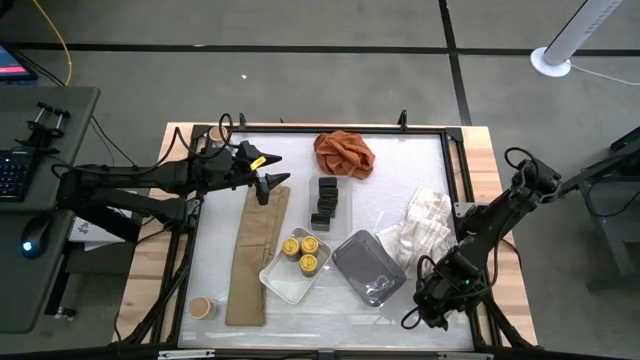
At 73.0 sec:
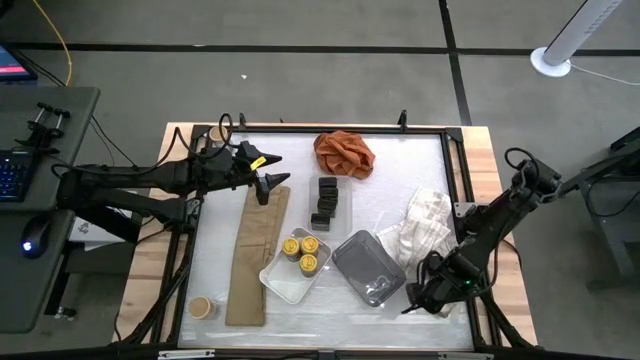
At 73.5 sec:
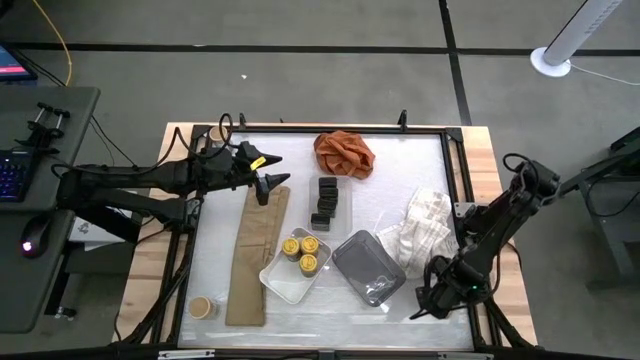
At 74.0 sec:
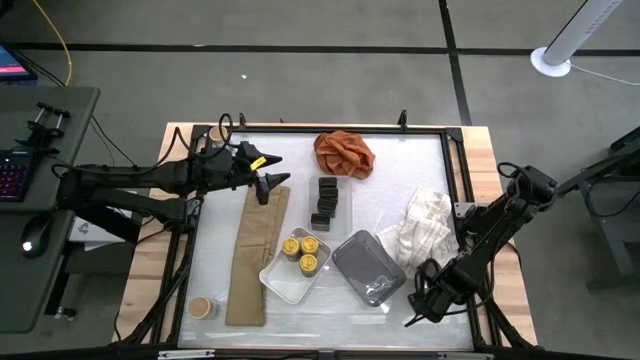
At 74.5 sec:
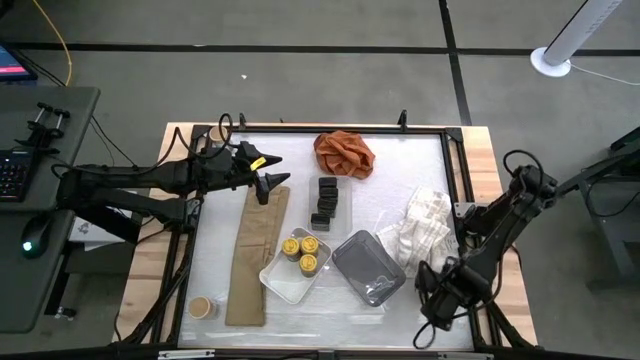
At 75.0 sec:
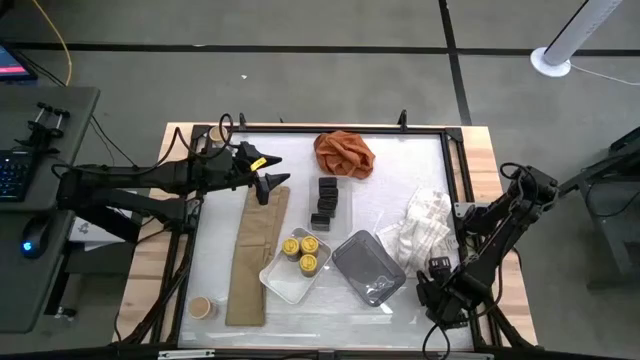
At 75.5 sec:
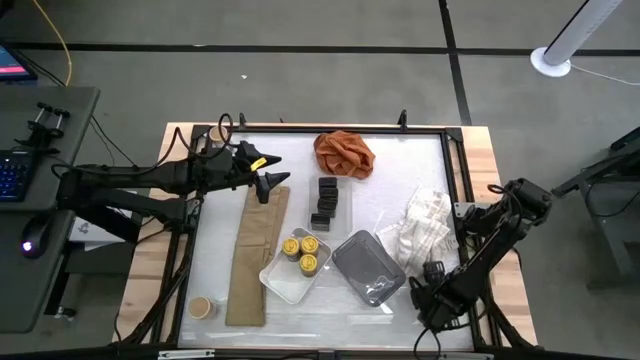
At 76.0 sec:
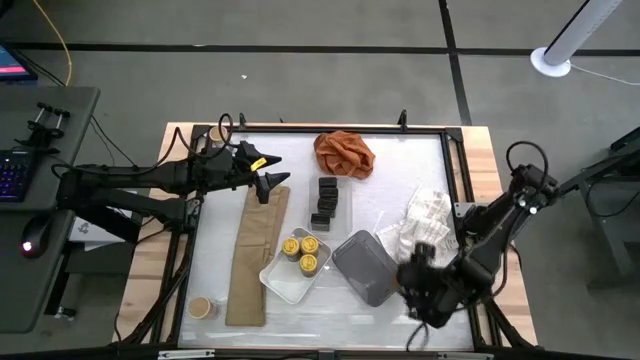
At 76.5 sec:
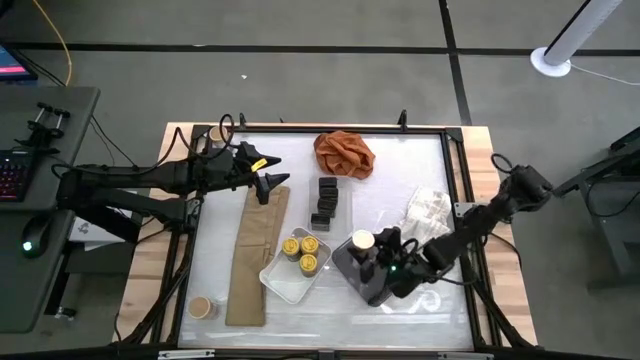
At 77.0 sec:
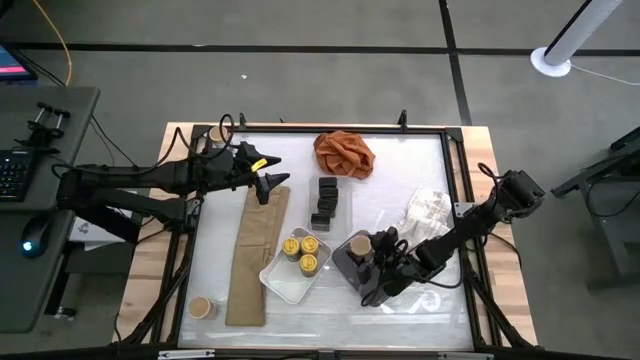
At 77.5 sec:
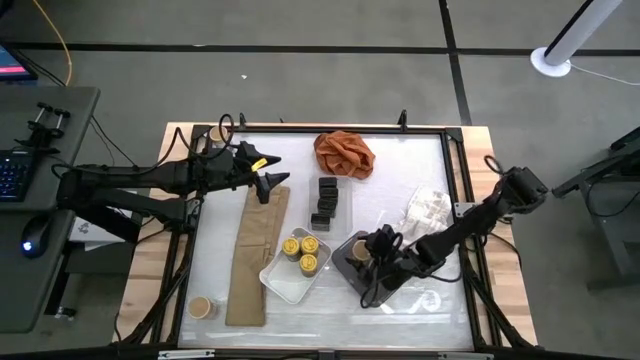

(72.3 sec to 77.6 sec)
Task: Sort spices by type
Put the bottom right gold seasoning bottle into the black transparent bin

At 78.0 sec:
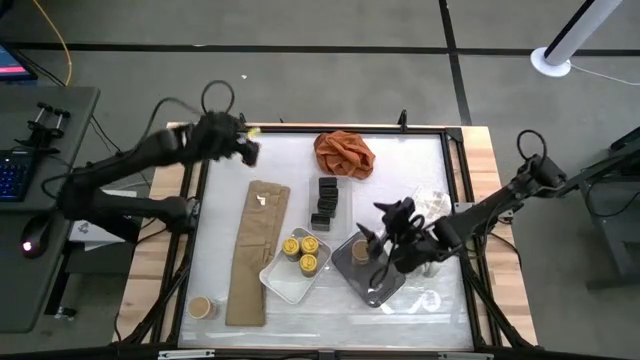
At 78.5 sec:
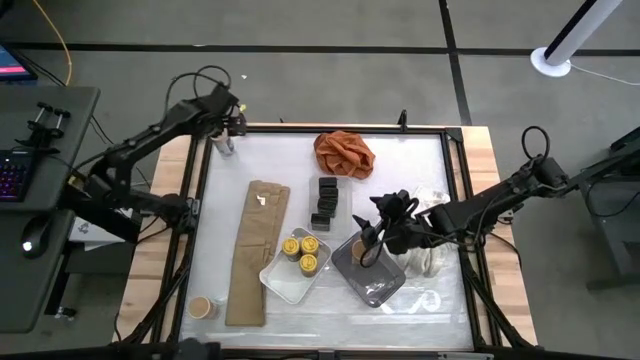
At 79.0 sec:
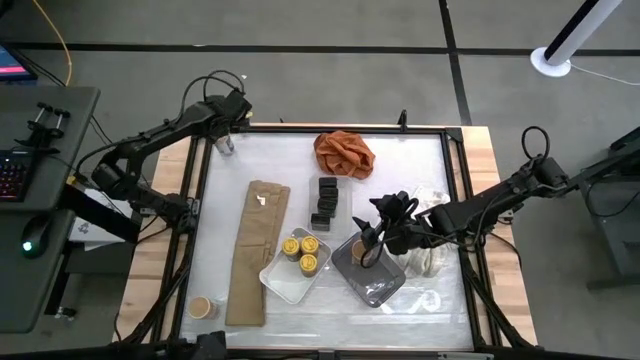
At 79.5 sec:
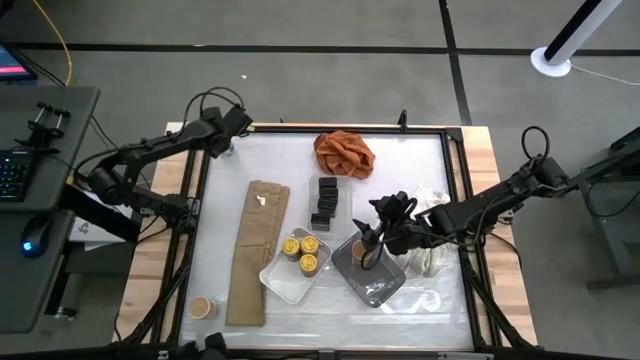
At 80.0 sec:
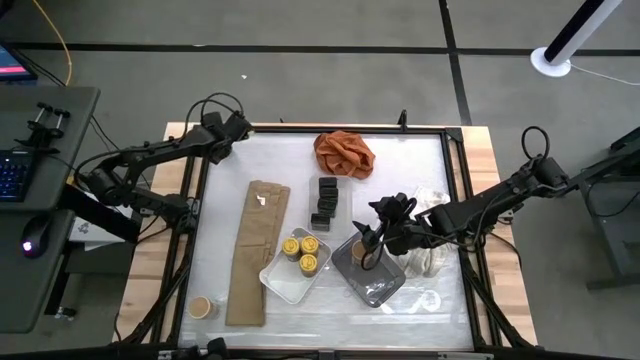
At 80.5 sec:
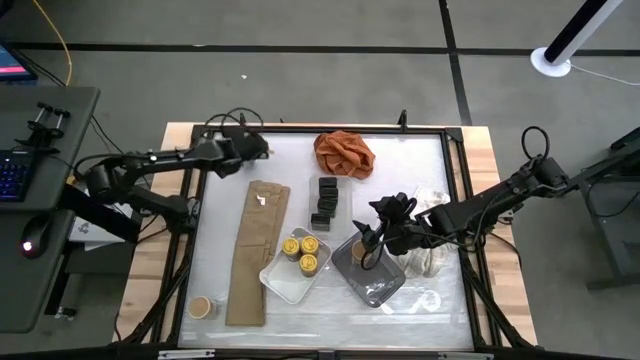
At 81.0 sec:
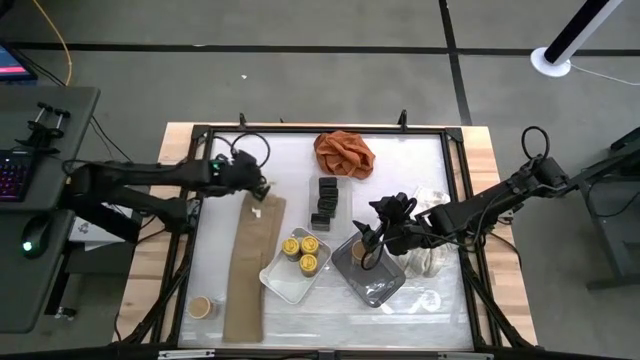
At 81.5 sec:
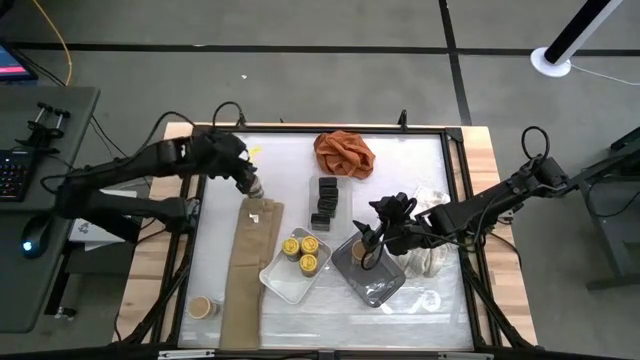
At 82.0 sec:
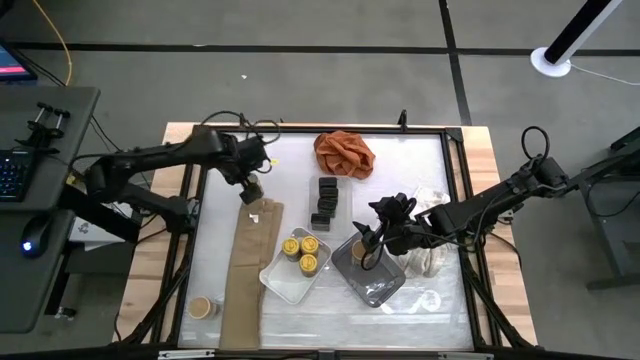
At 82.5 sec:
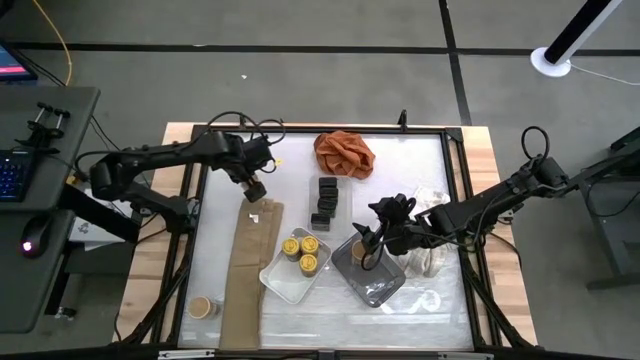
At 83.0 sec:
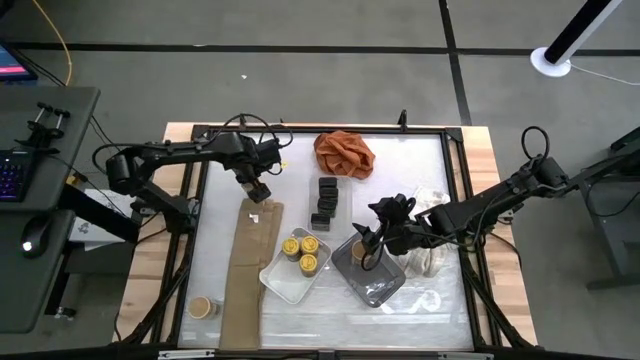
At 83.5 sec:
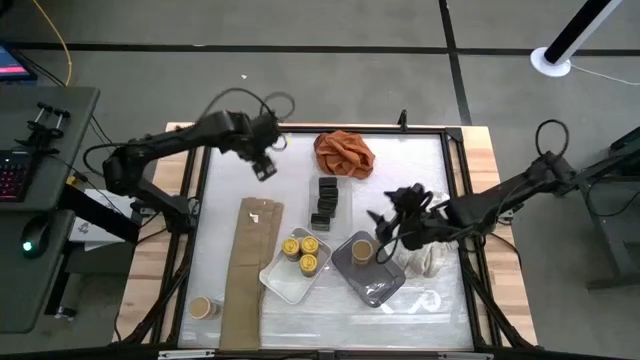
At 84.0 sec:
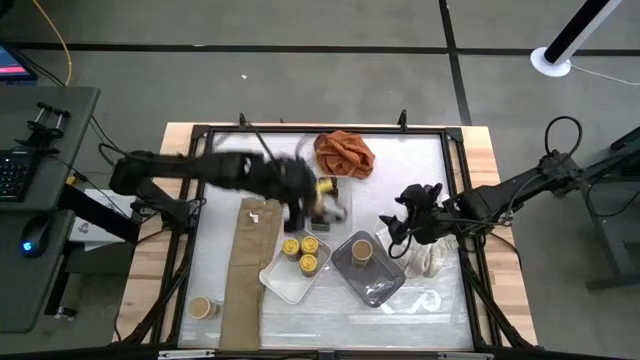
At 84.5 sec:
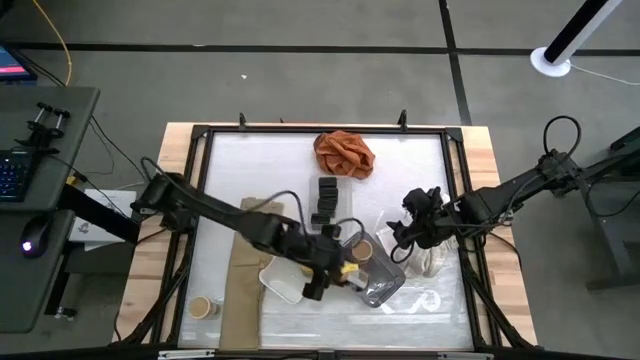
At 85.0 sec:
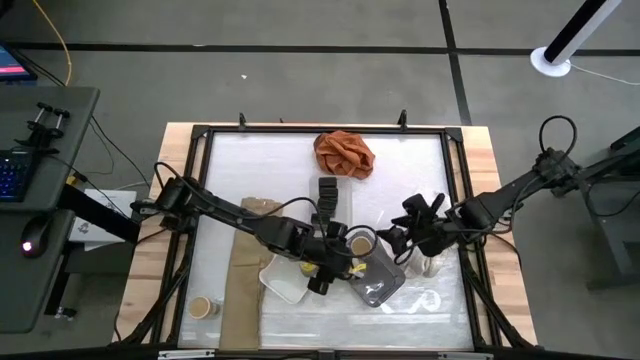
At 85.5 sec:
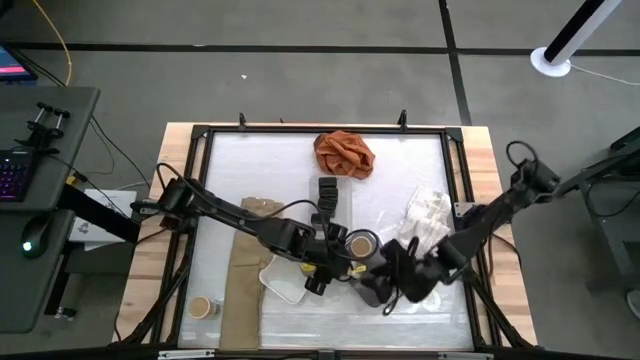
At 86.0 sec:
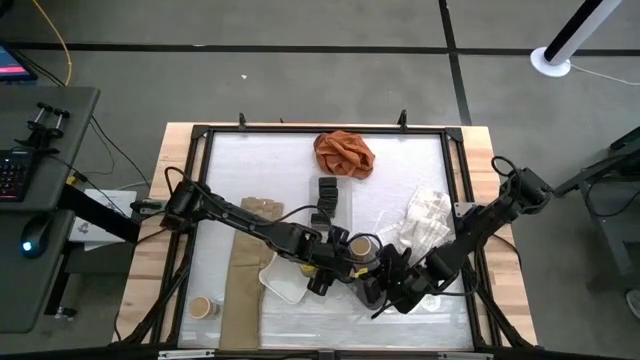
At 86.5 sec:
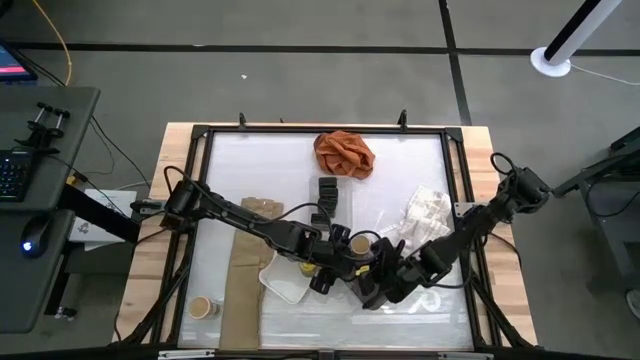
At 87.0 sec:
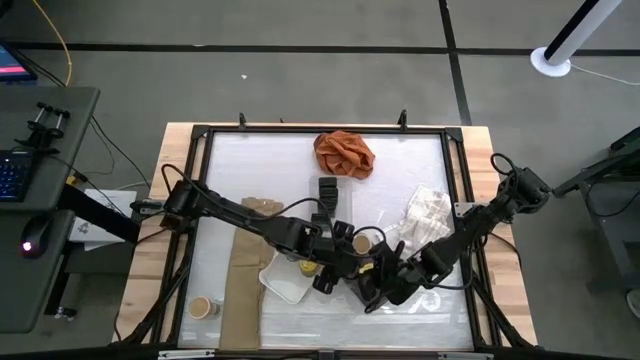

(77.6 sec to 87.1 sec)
Put the top gold seasoning bottle into the black transparent bin

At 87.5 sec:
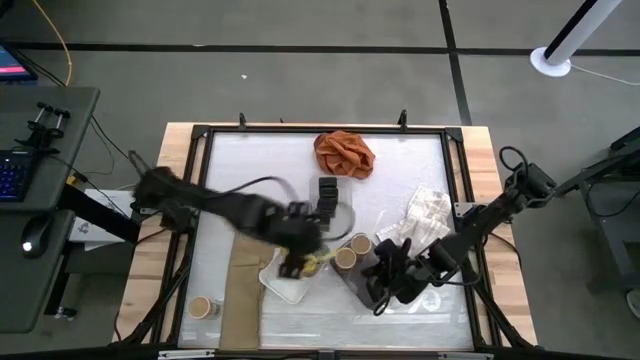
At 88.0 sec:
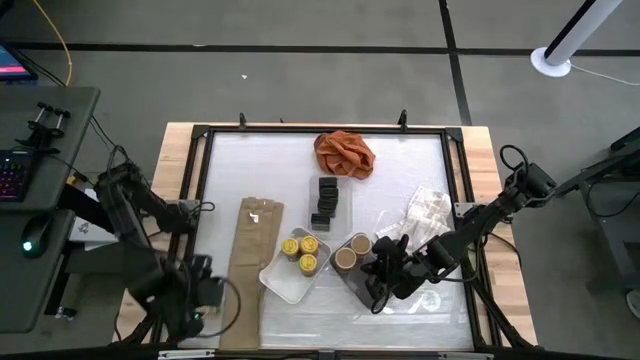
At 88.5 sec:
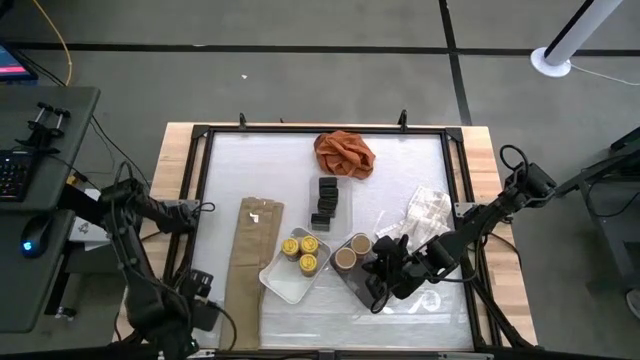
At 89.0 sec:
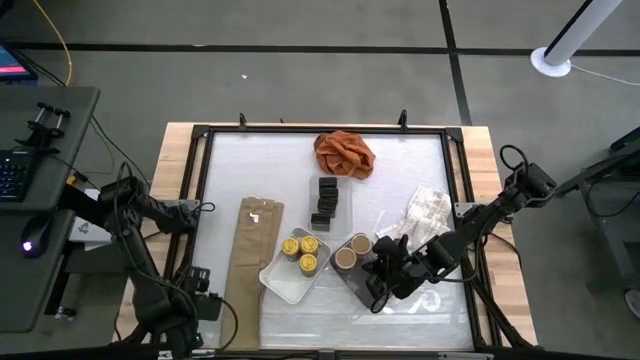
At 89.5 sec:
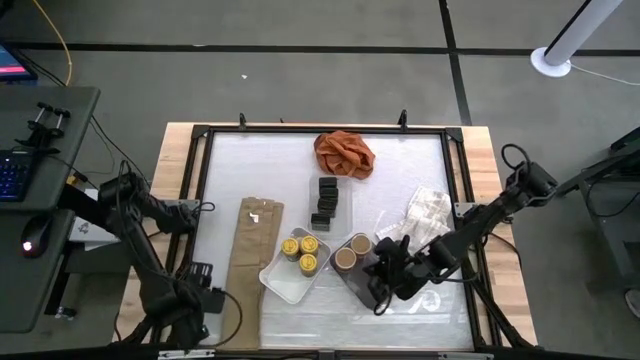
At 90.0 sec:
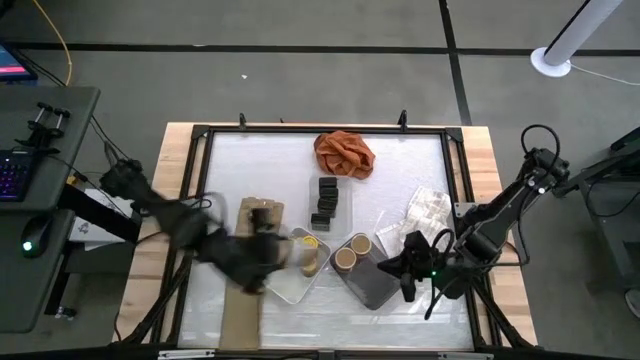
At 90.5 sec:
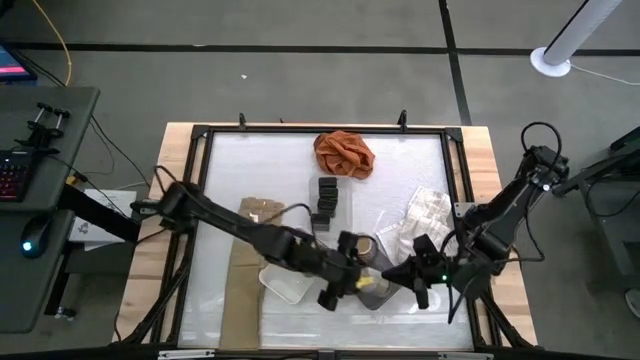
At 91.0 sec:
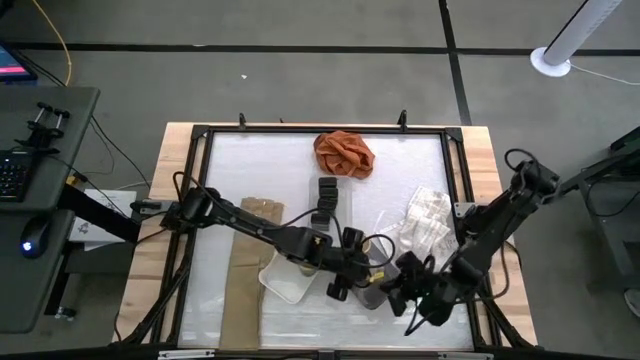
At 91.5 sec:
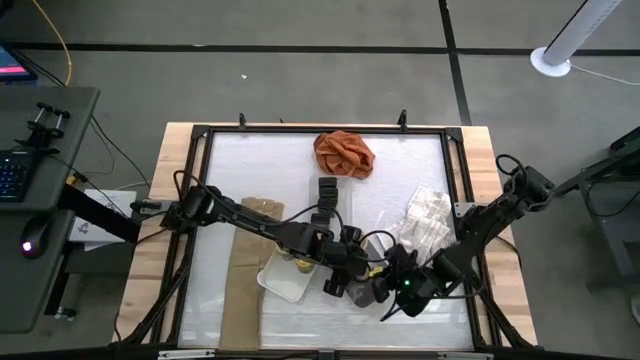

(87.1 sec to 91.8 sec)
Put the gold seasoning bottle into the black transparent bin

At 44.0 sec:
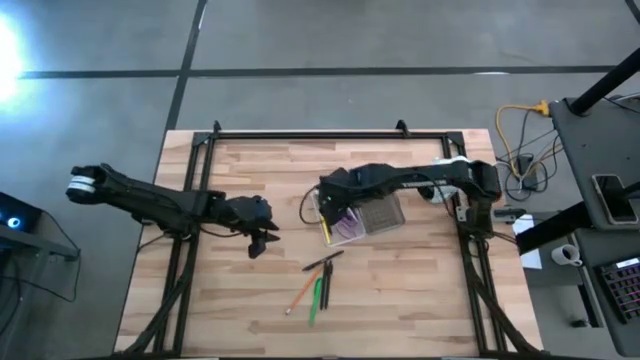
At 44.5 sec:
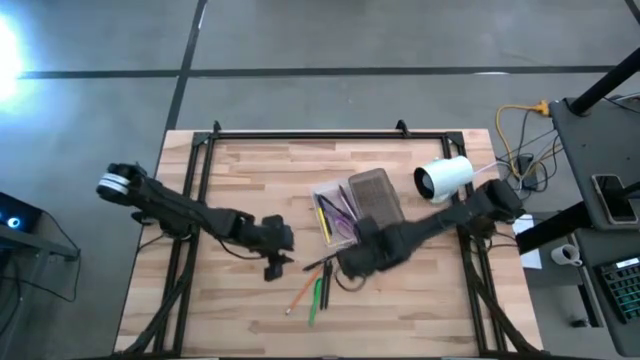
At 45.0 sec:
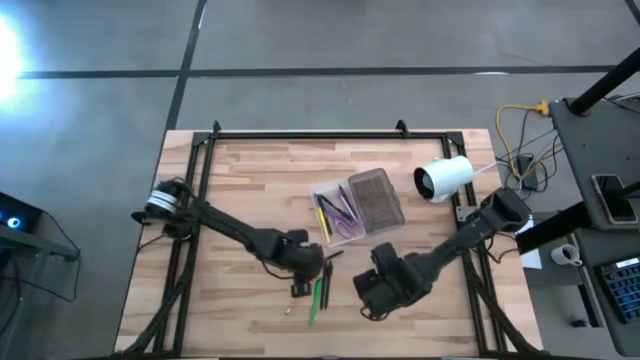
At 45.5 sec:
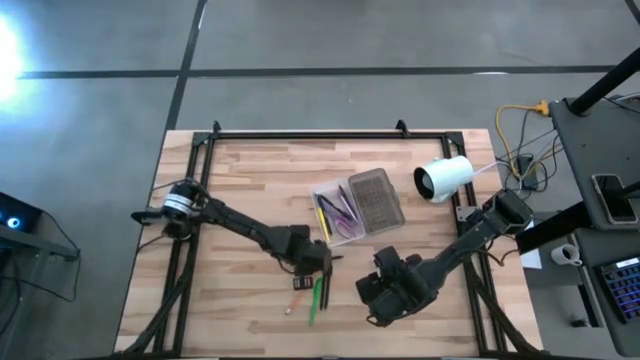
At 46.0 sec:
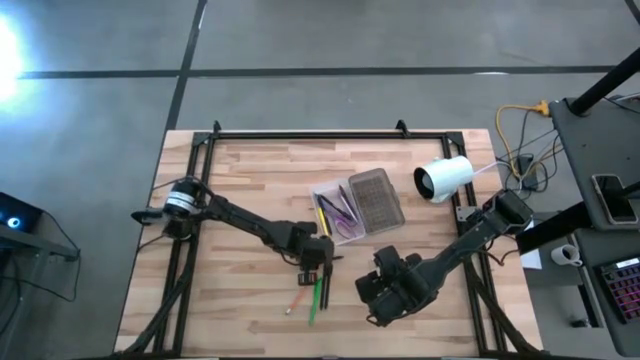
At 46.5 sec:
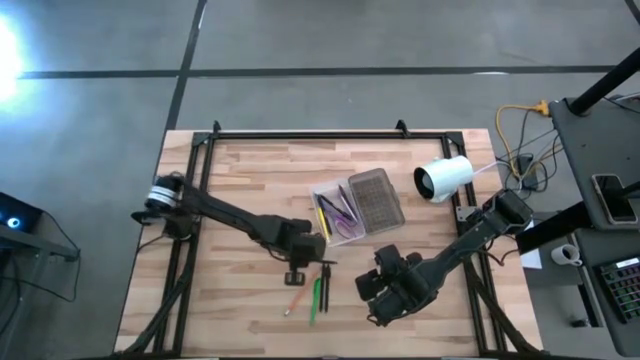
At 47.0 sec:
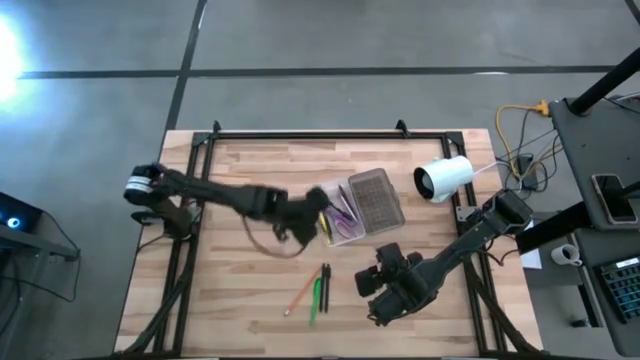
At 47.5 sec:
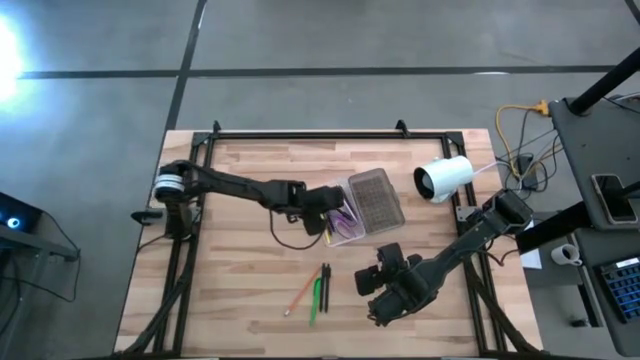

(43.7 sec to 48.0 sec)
Task: Pick & place school supplies into a supply box
Put the black pen into the supply box
